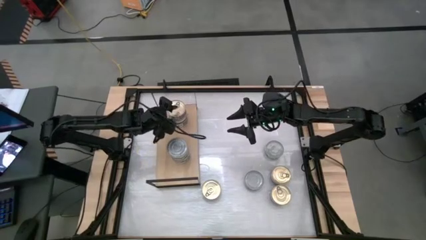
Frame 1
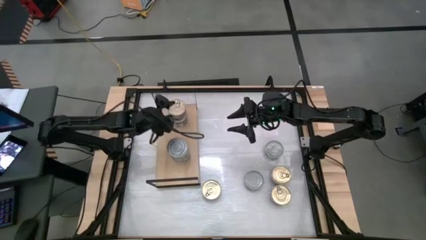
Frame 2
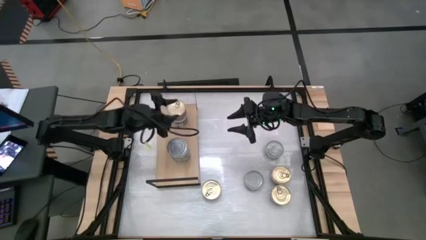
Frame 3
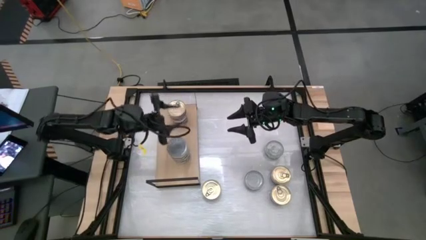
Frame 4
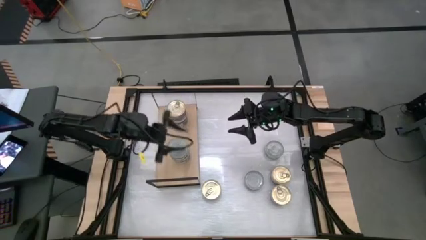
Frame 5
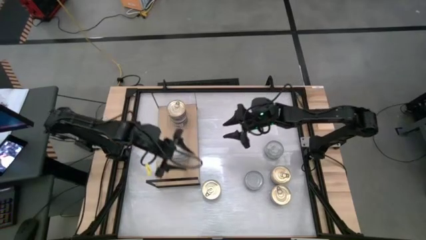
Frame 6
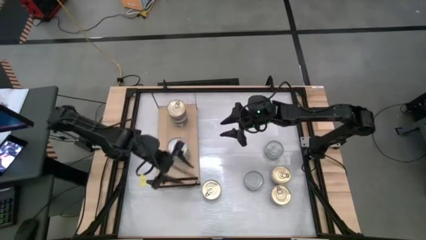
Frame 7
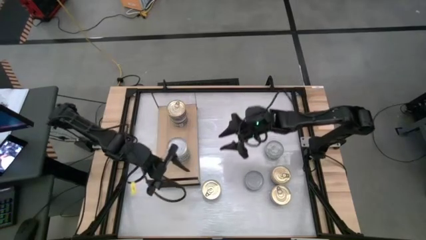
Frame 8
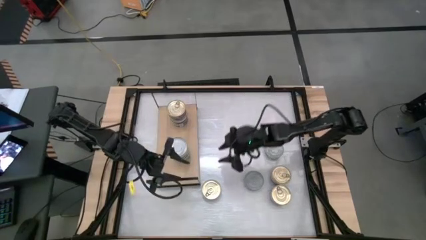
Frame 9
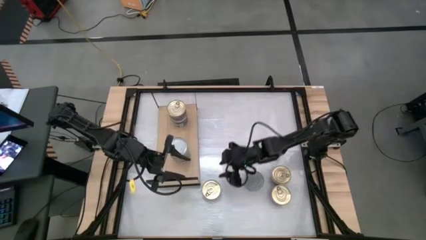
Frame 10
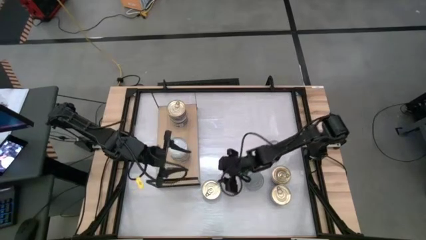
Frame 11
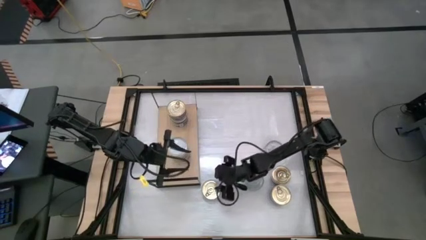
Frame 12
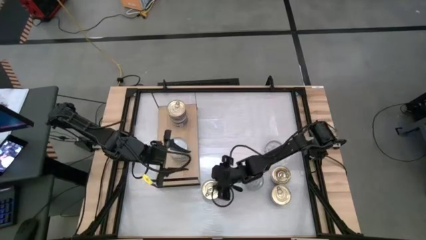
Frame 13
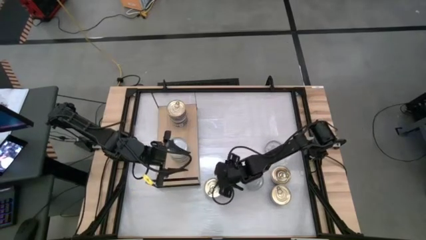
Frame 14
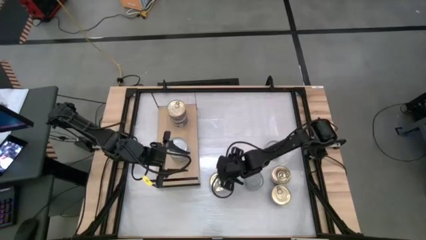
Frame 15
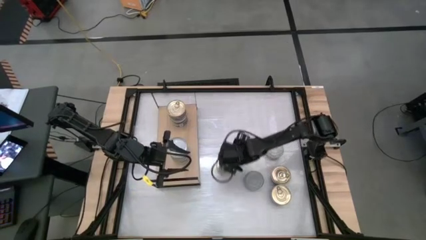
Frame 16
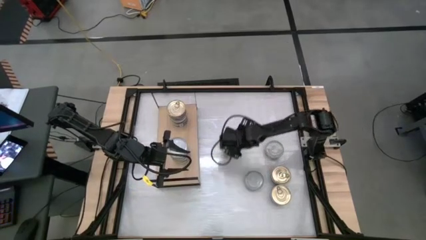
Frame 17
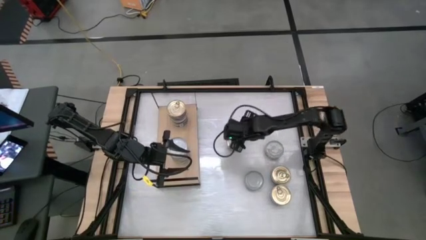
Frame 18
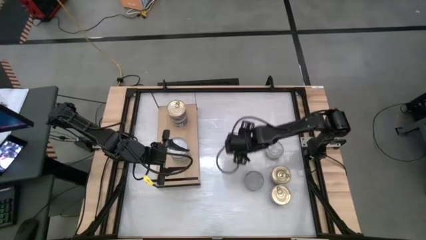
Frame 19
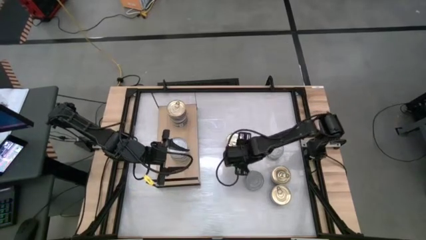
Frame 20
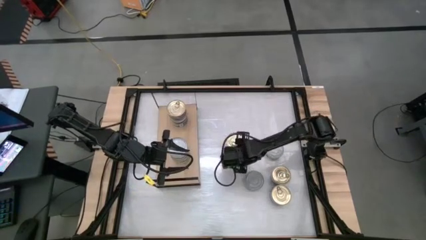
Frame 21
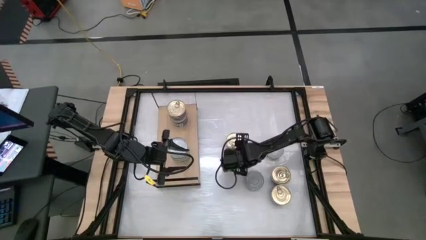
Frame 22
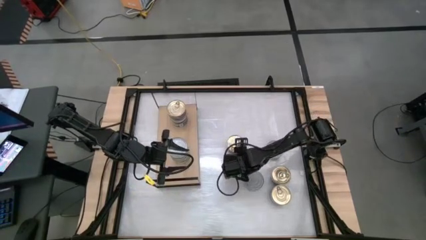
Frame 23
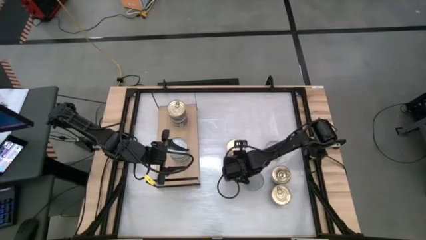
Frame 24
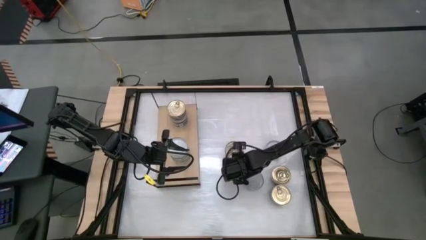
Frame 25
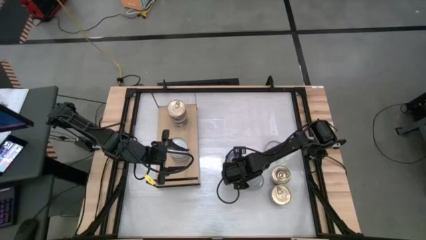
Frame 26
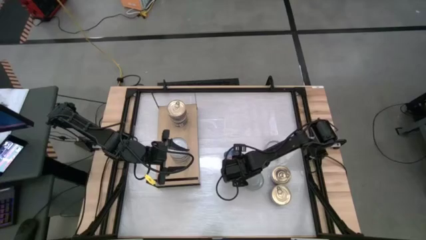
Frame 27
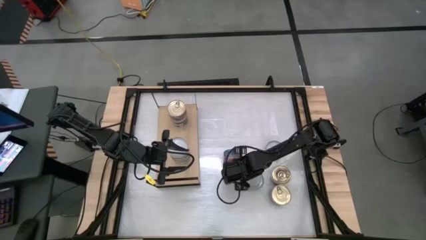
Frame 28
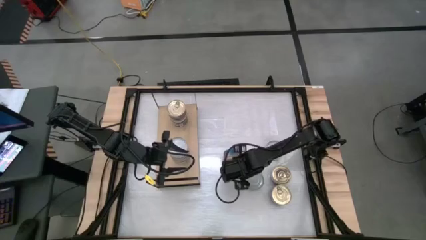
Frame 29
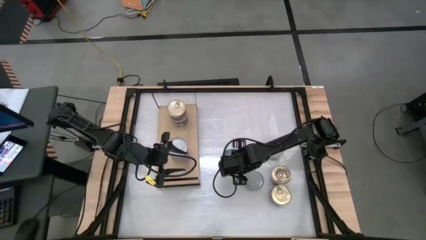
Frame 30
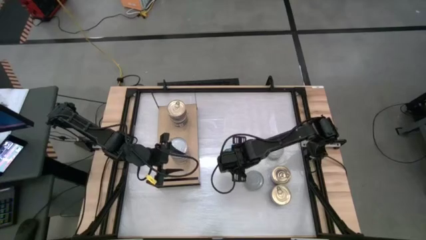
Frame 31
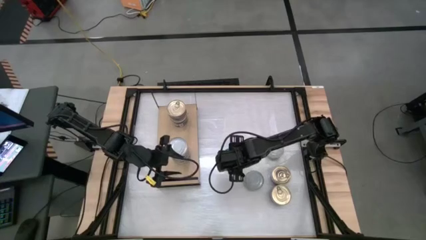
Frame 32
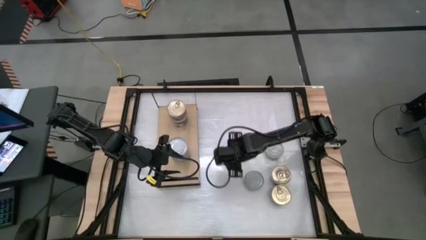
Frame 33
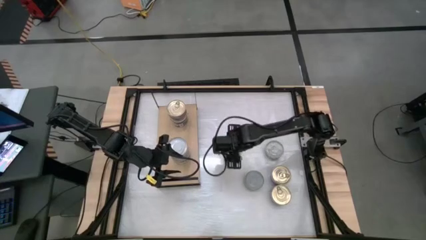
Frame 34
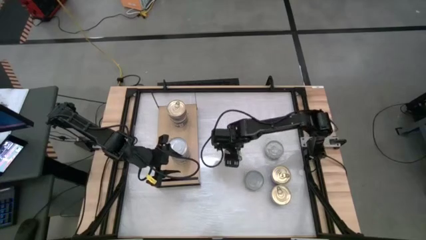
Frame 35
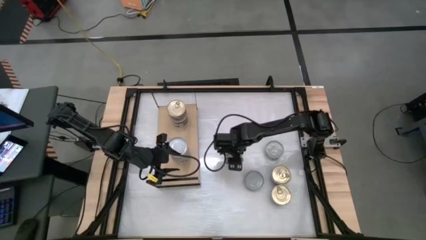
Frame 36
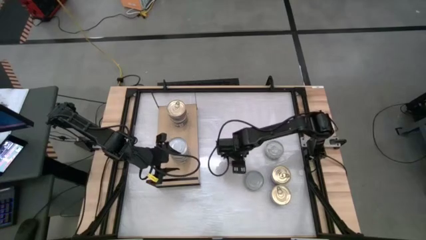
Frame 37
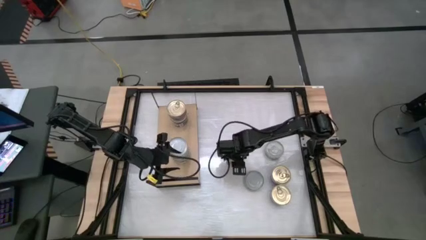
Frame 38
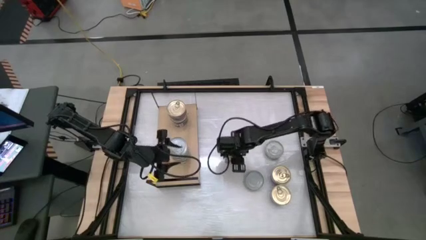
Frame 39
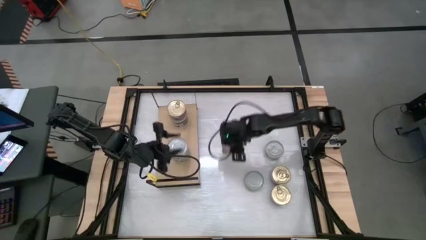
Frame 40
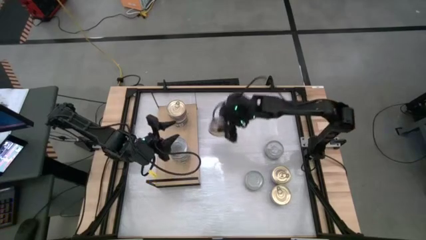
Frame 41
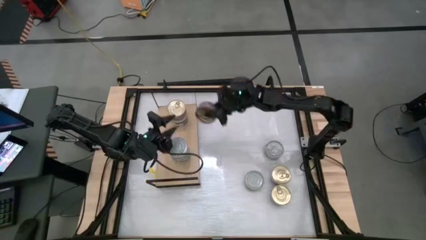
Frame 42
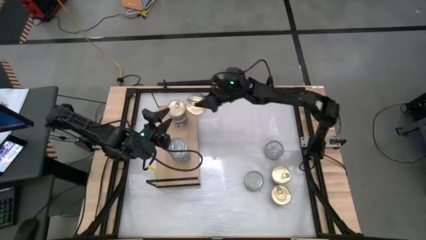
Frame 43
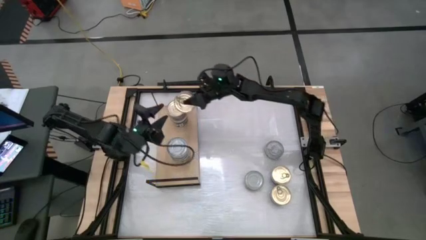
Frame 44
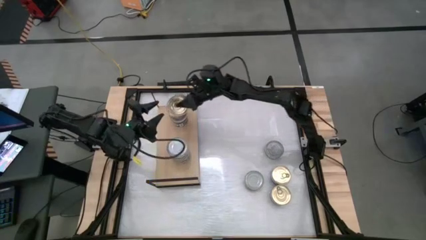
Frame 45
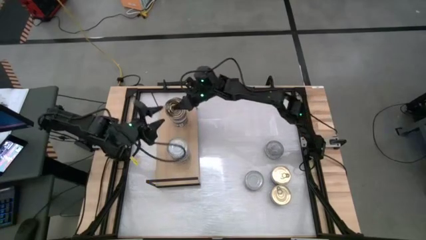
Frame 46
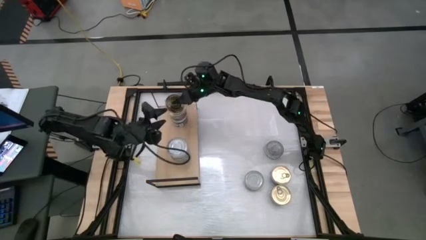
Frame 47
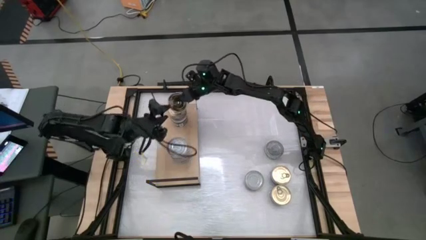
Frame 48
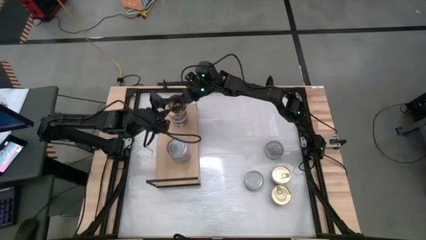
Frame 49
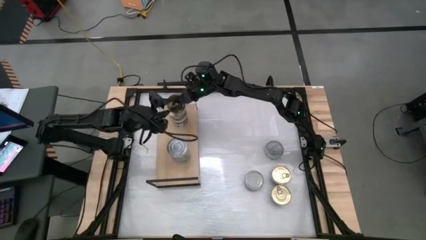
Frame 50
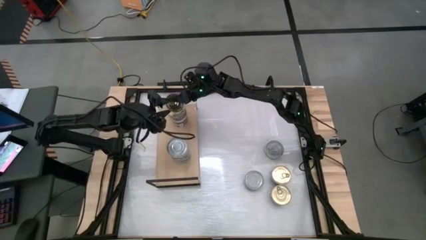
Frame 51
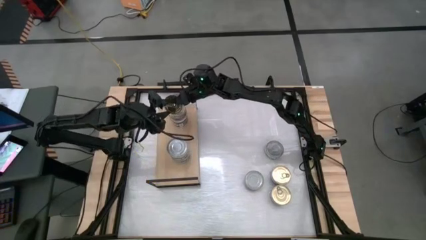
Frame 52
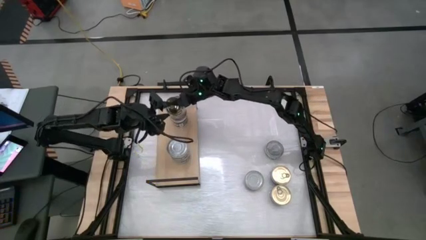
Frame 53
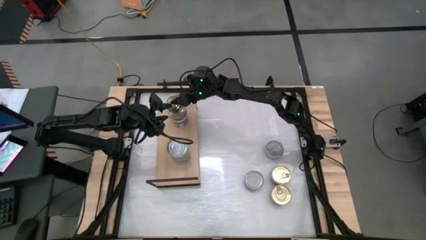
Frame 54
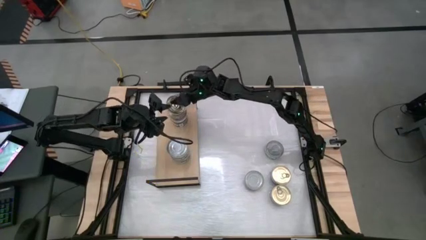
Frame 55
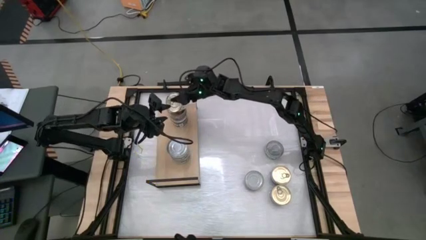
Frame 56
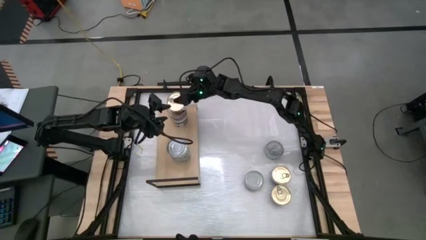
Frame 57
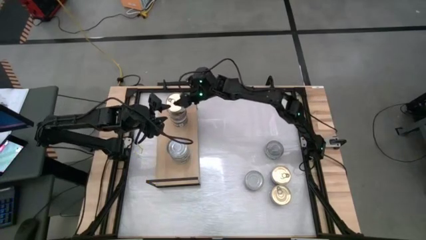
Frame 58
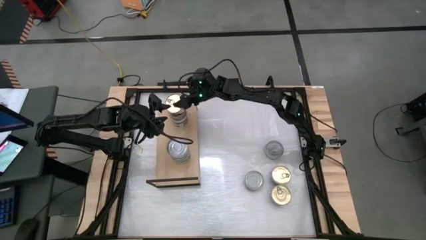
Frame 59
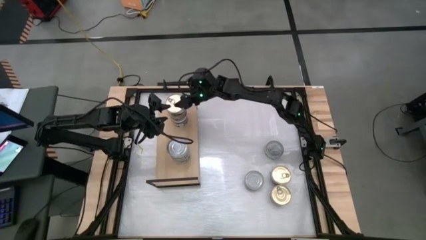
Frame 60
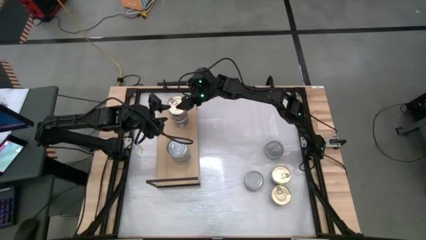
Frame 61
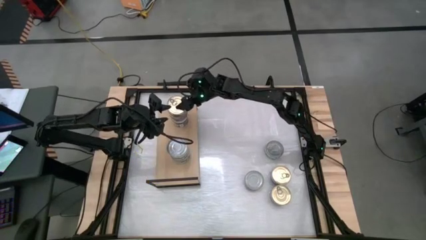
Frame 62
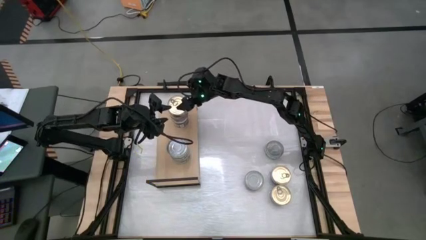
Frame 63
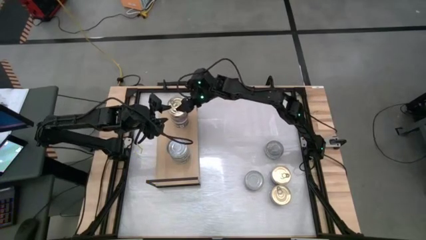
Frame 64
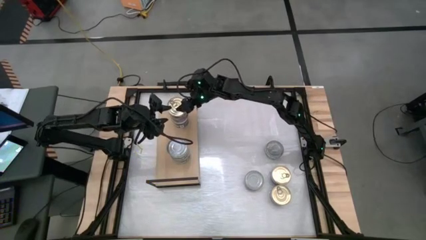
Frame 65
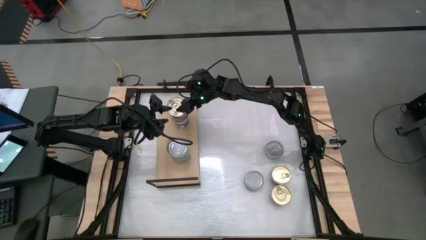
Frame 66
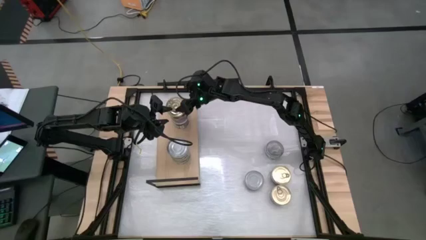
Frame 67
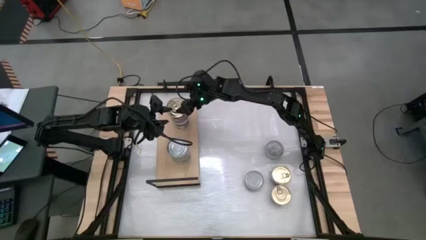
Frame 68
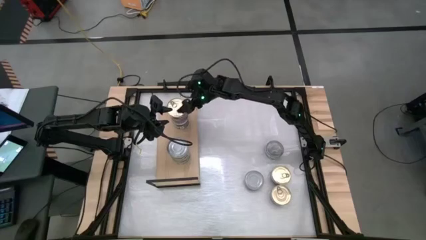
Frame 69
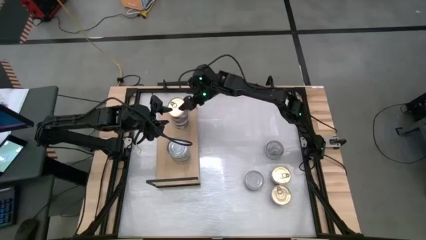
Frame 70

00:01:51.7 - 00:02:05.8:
Task: Stack canned seafood by type on shelf
Stack the blue-pink tuna can on top of the other blue-pink tuna can on the shelf

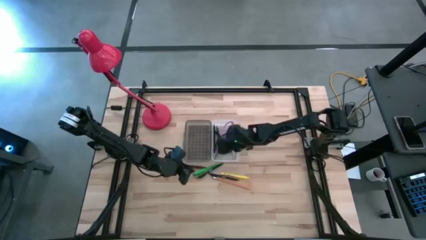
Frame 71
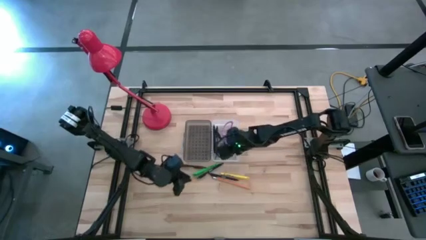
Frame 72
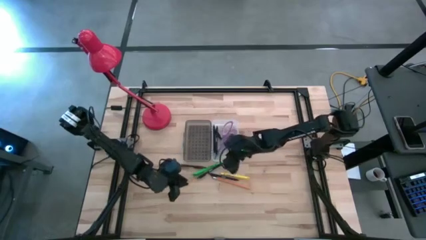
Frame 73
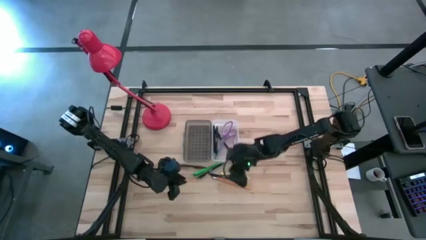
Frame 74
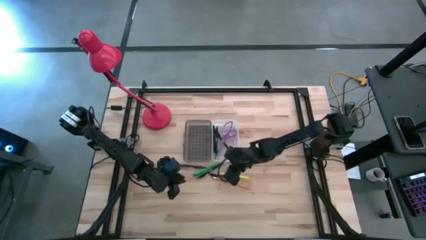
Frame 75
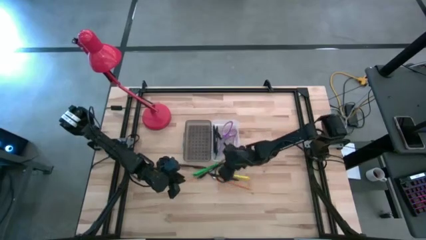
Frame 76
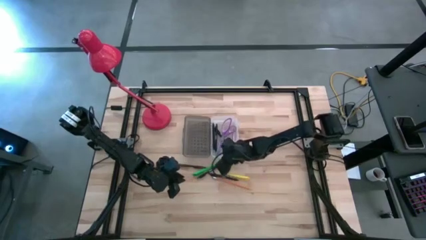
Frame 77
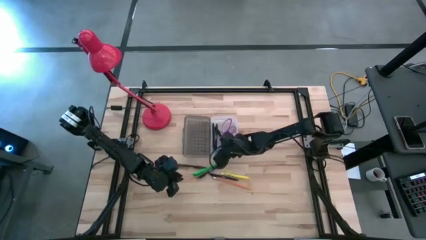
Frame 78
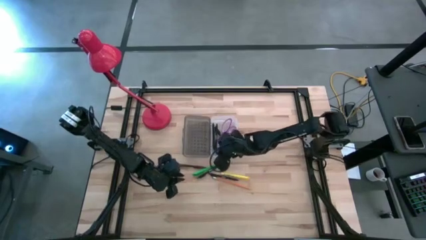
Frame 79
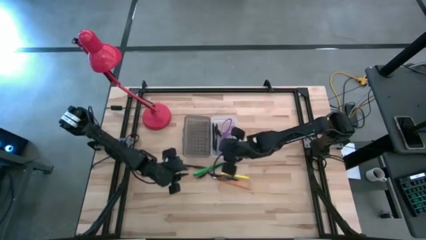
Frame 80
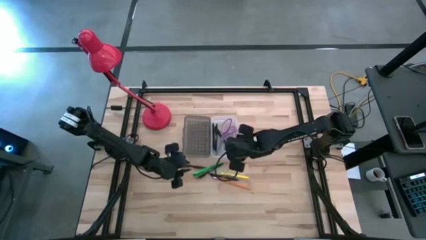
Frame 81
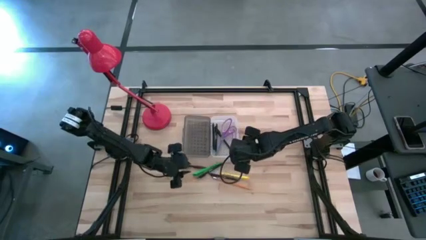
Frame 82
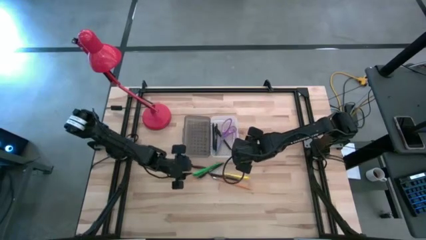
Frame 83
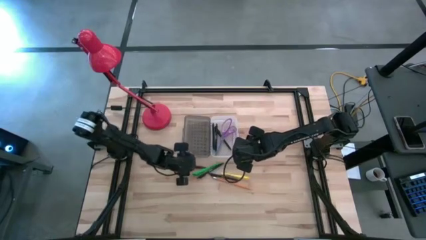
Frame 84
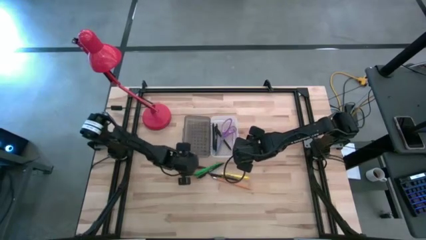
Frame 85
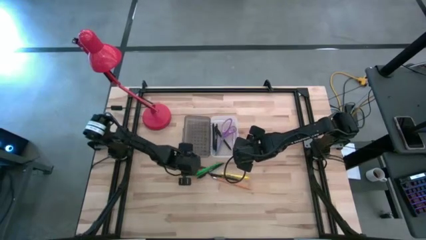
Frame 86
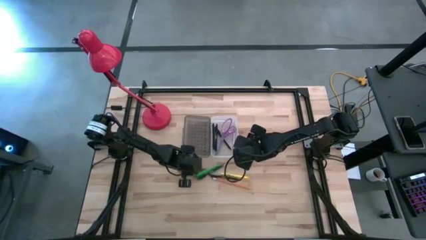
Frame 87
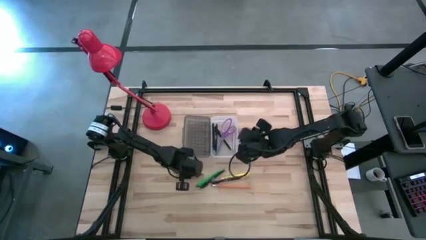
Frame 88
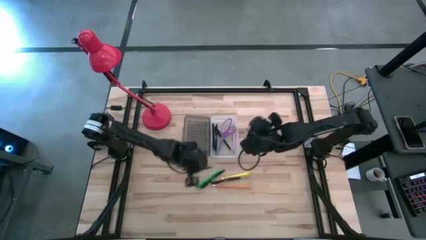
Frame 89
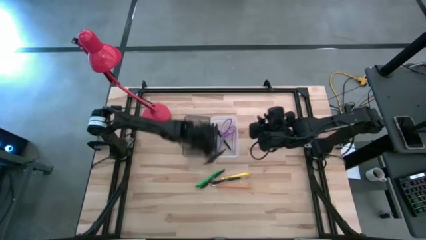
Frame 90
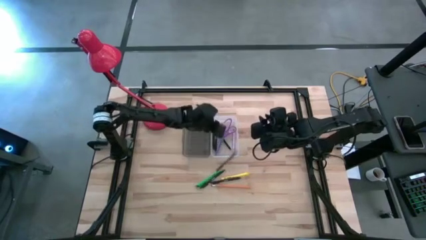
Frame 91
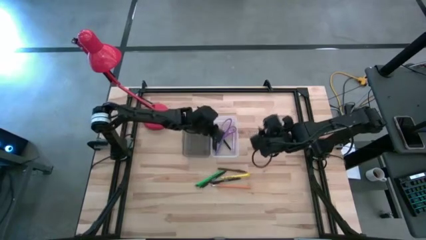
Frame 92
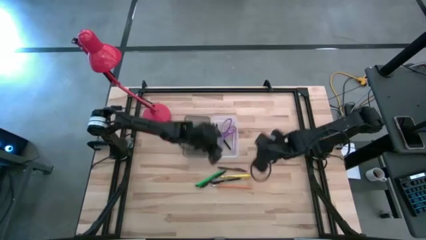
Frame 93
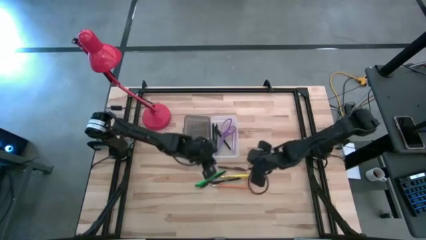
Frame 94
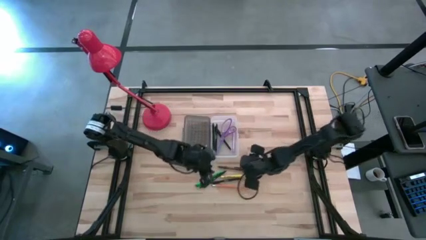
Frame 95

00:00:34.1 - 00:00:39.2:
Task: Pick & place school supplies into a supply box
Put the brown pen into the supply box
